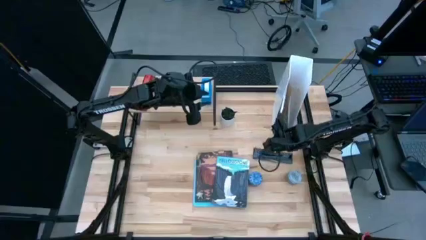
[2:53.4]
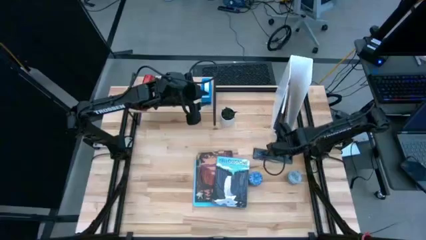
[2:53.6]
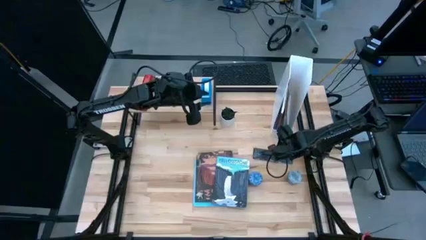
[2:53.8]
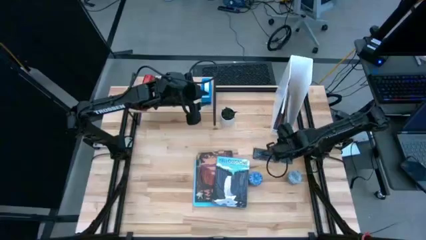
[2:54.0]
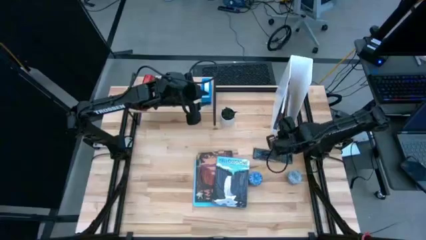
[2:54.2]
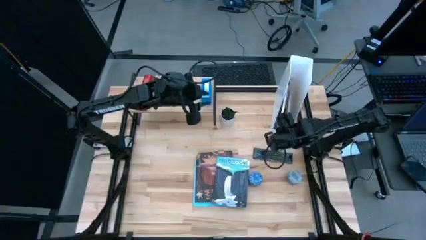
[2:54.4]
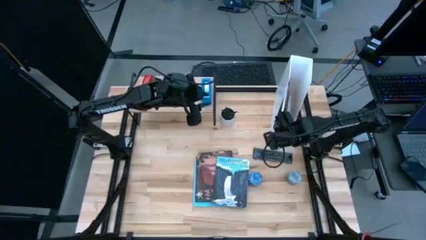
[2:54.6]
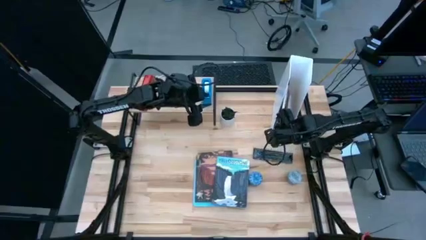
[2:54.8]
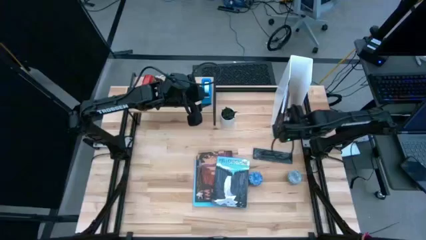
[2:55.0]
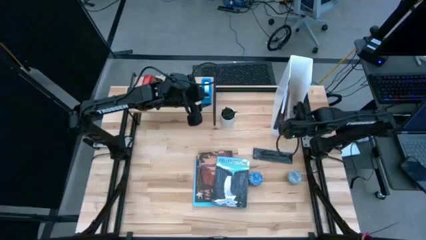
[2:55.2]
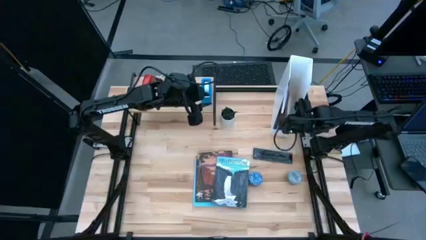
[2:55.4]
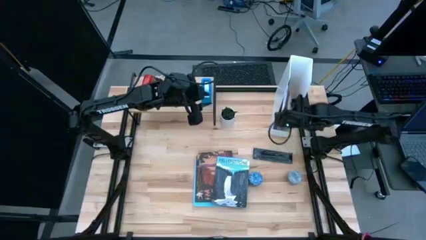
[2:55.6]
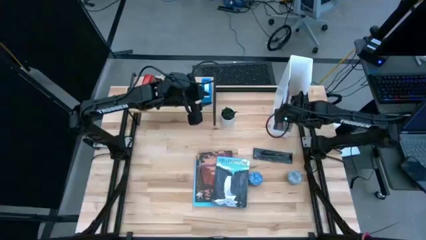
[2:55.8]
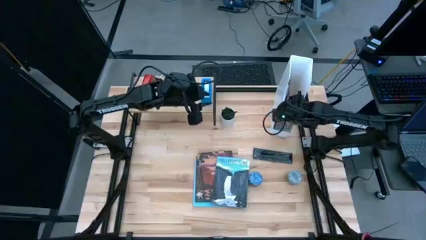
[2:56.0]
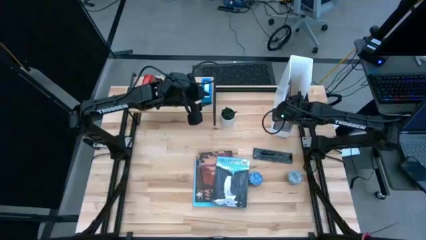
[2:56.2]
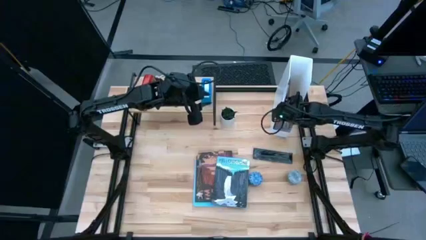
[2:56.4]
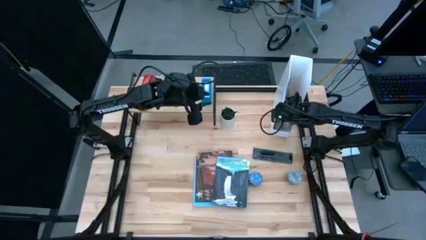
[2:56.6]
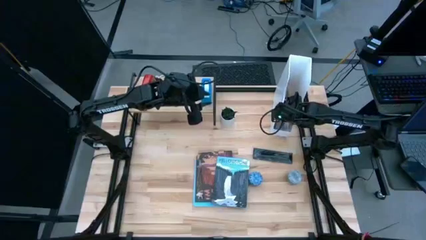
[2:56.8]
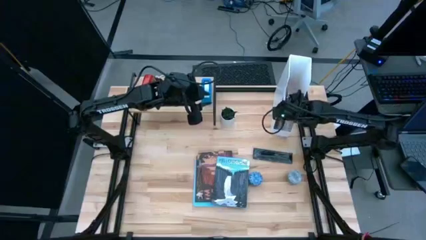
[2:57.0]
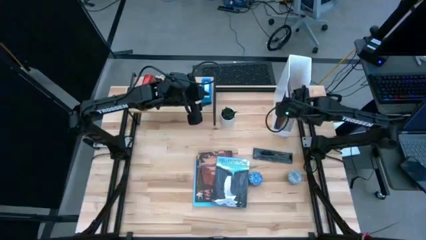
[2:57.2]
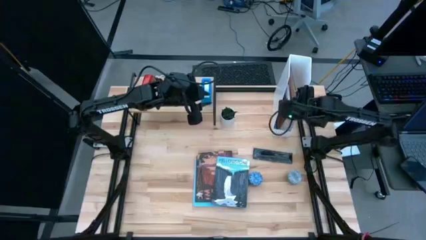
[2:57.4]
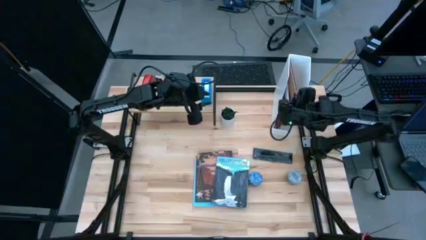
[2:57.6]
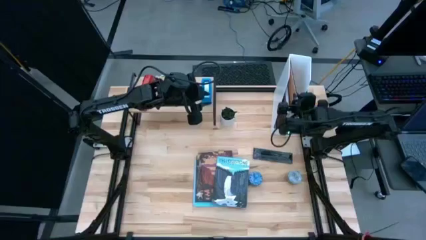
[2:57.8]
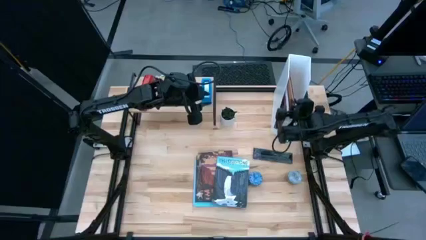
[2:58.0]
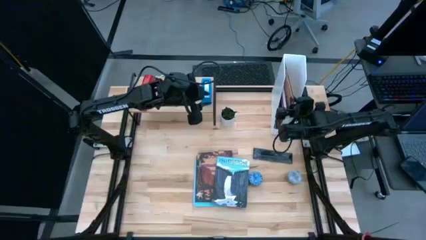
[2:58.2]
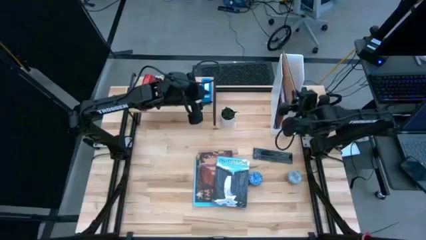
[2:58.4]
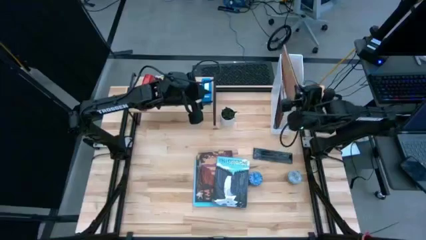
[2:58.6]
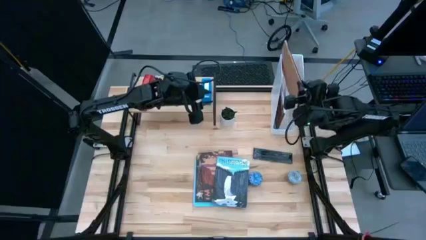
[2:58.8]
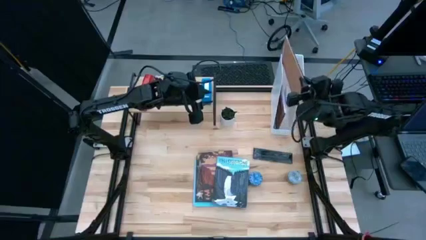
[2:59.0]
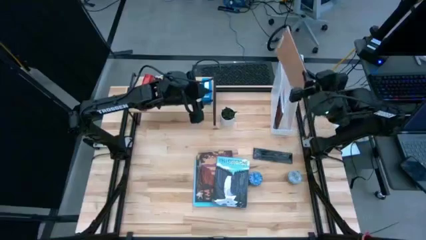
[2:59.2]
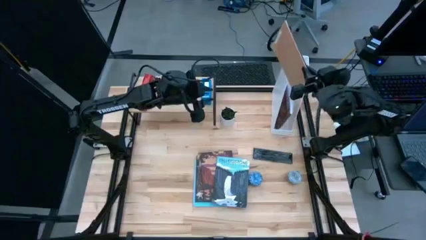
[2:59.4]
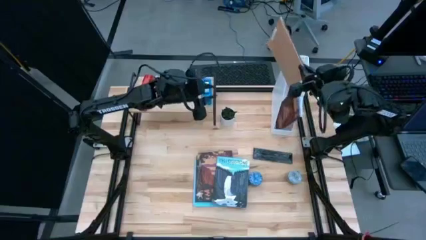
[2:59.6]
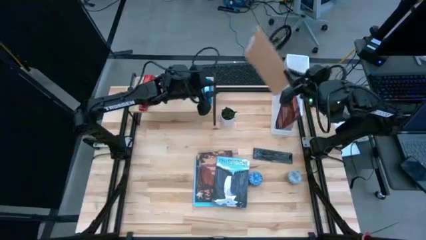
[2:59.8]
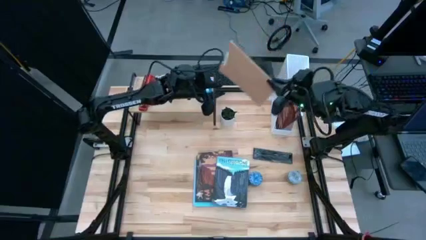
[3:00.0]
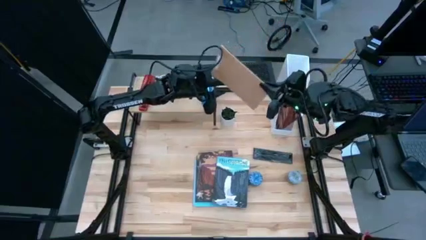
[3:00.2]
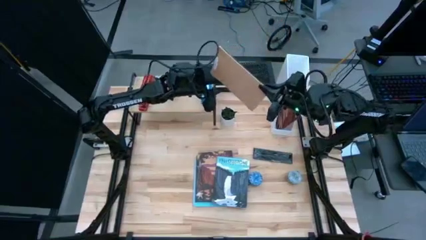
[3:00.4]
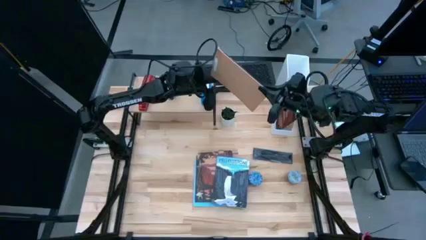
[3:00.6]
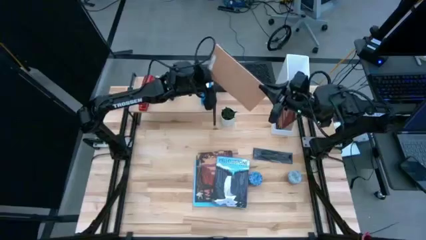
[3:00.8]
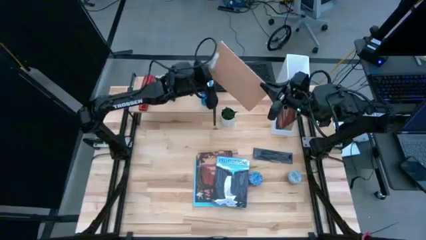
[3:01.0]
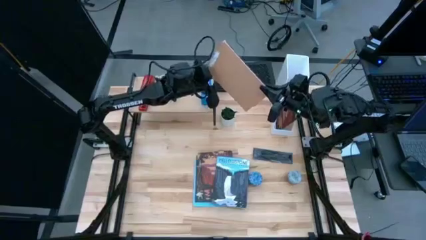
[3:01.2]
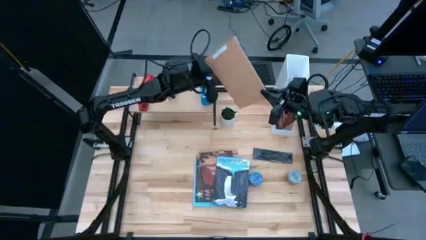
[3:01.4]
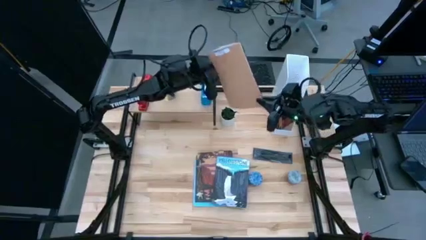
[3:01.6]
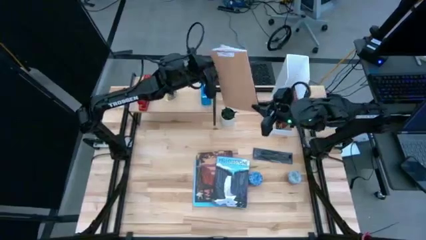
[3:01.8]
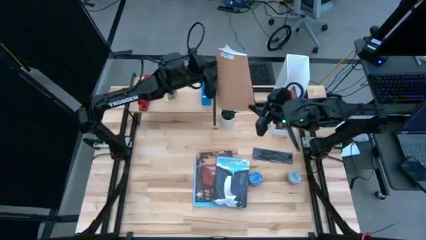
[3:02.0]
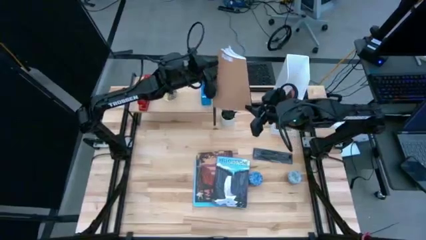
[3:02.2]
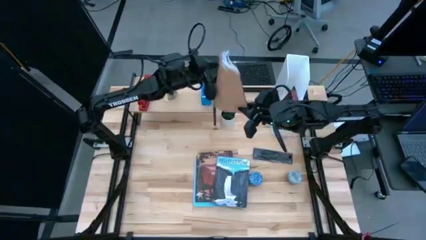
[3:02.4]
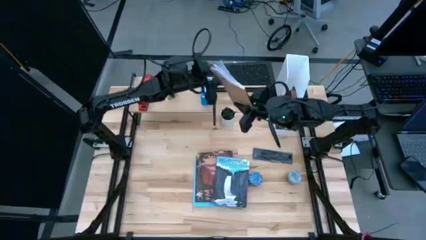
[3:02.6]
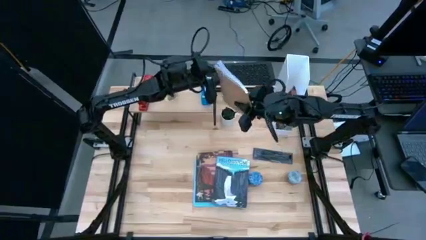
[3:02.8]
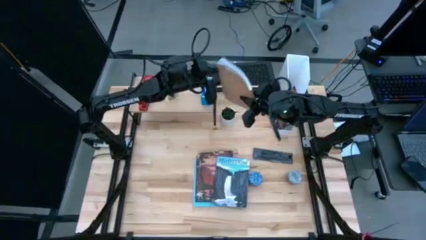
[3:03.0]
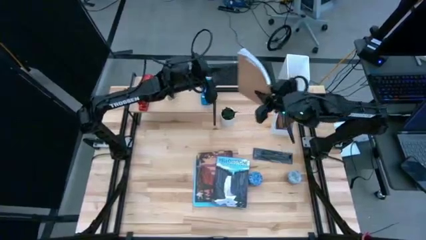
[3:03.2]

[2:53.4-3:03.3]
Task: Stock shelves
Put the blue/brown book into the white book shelf

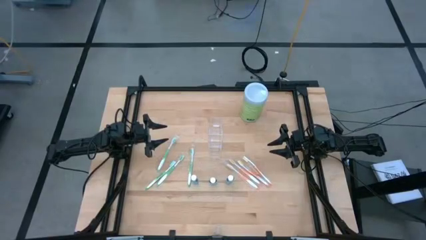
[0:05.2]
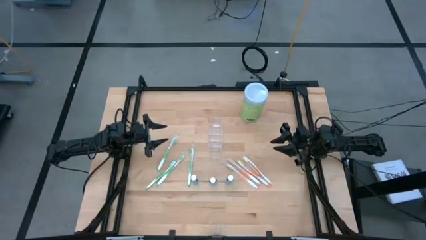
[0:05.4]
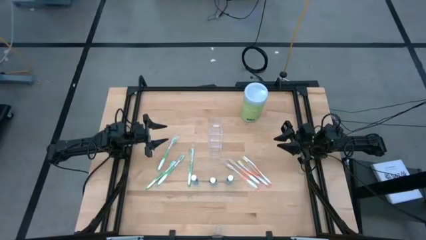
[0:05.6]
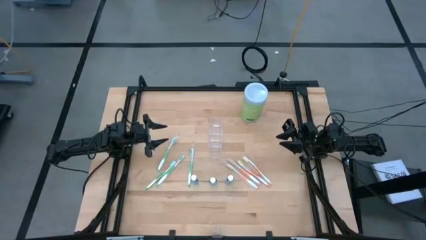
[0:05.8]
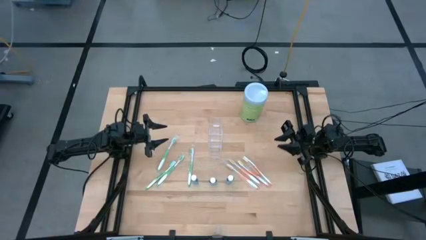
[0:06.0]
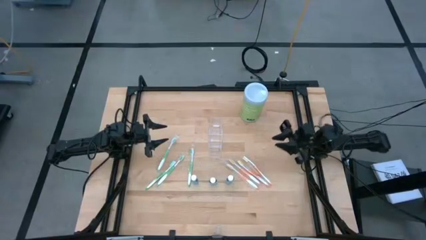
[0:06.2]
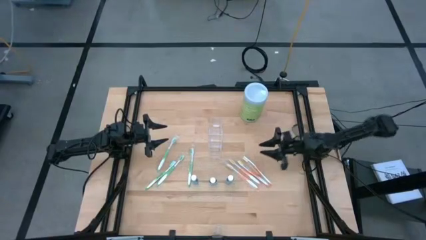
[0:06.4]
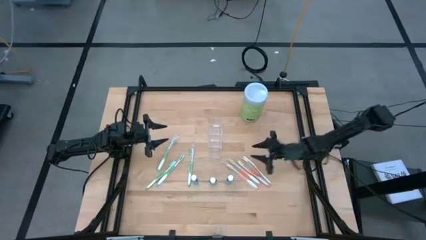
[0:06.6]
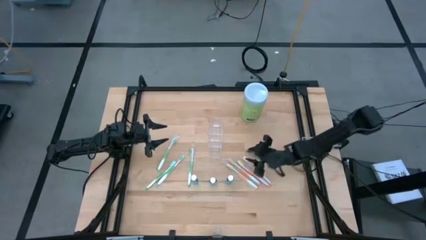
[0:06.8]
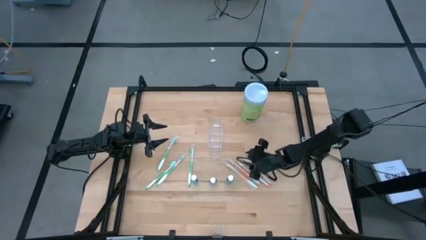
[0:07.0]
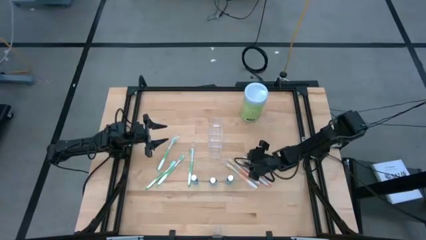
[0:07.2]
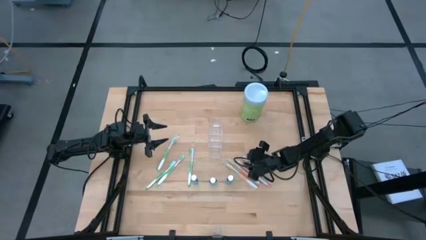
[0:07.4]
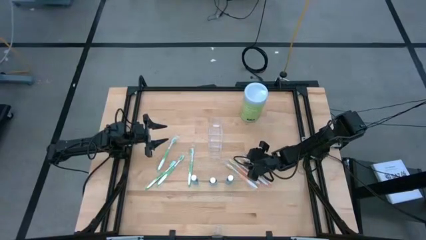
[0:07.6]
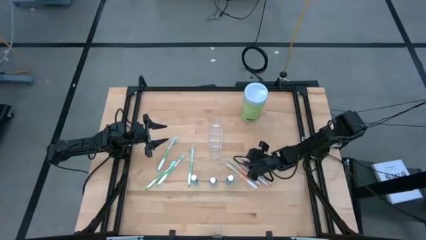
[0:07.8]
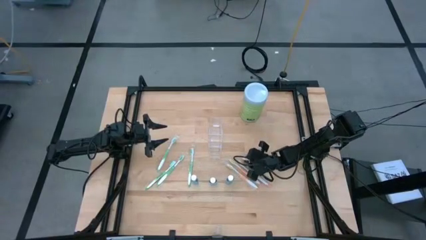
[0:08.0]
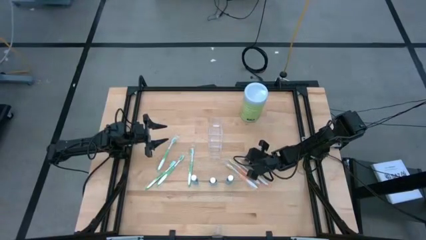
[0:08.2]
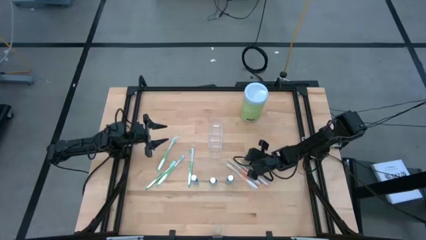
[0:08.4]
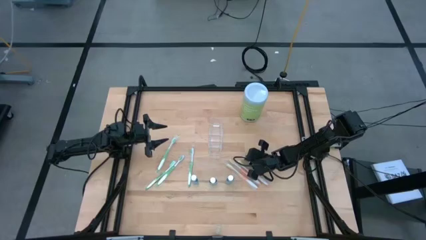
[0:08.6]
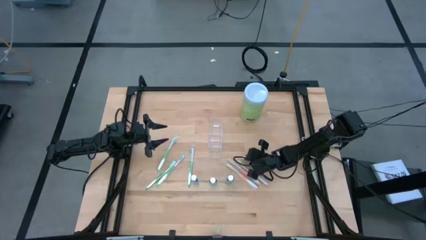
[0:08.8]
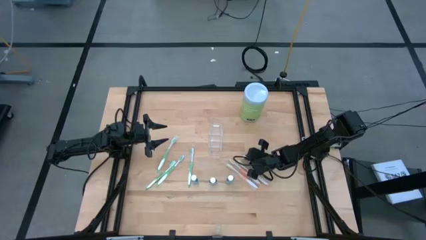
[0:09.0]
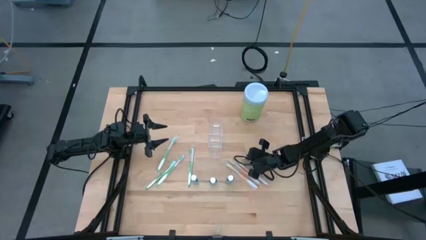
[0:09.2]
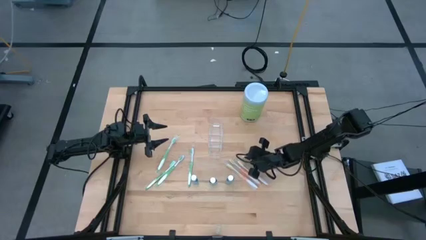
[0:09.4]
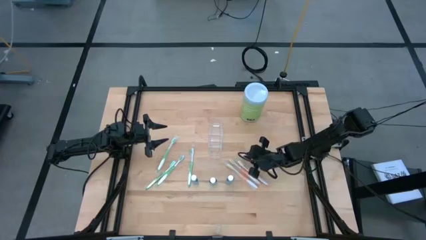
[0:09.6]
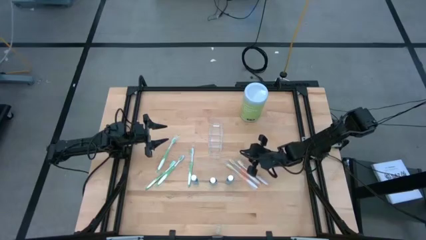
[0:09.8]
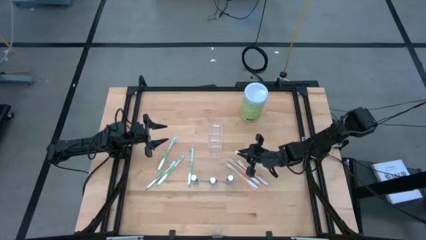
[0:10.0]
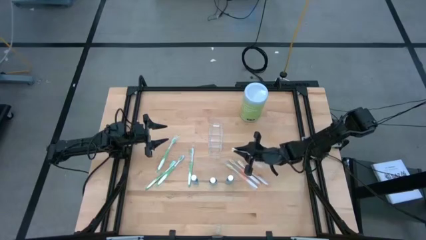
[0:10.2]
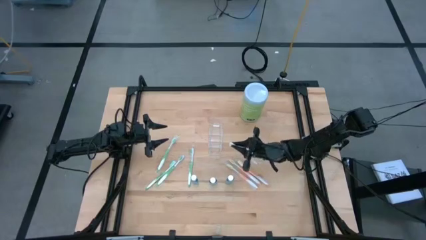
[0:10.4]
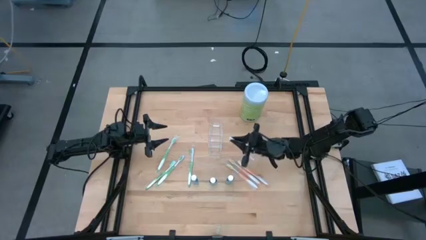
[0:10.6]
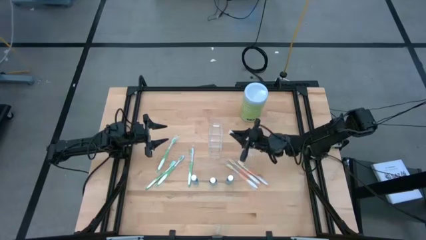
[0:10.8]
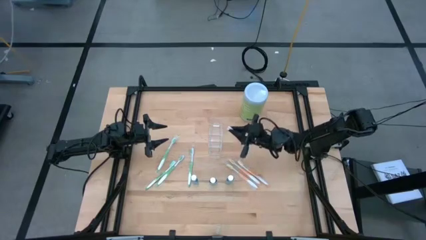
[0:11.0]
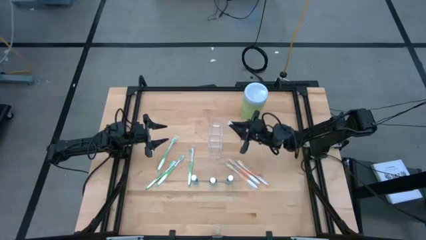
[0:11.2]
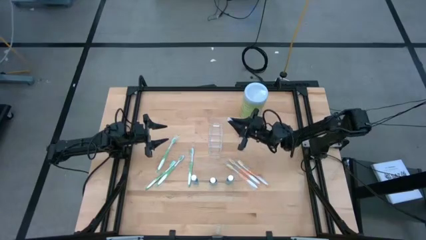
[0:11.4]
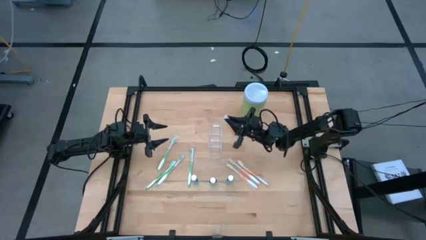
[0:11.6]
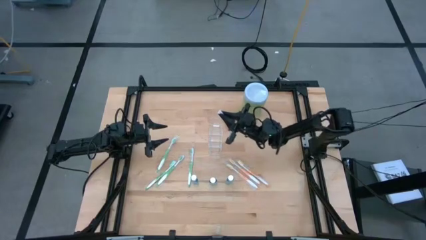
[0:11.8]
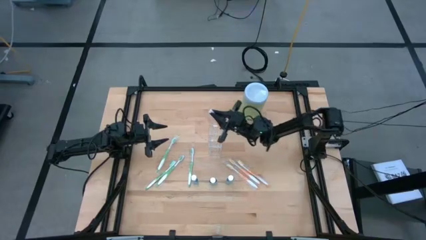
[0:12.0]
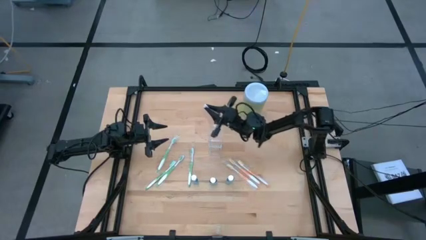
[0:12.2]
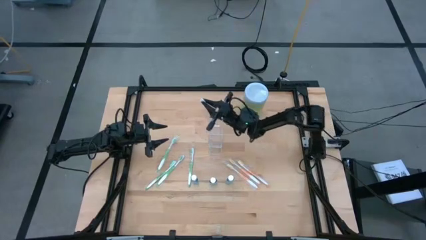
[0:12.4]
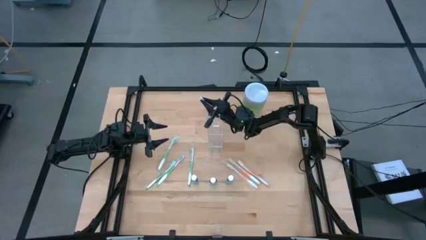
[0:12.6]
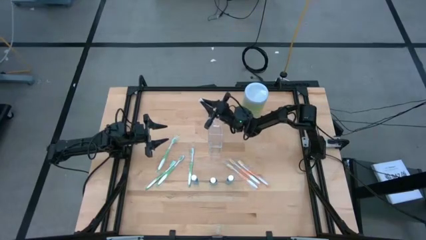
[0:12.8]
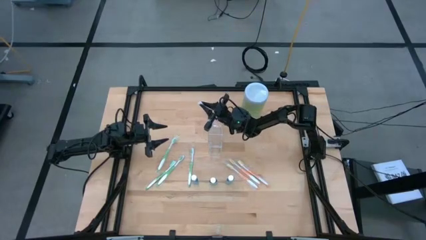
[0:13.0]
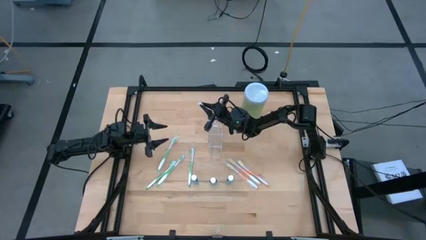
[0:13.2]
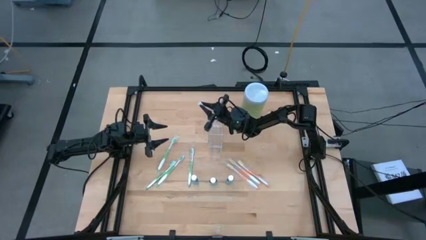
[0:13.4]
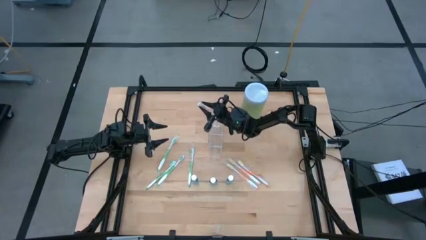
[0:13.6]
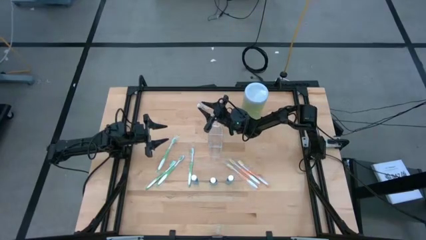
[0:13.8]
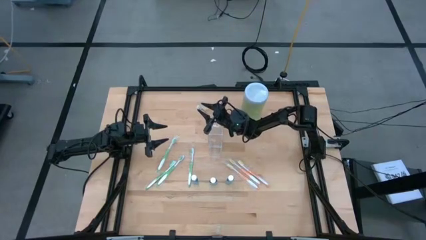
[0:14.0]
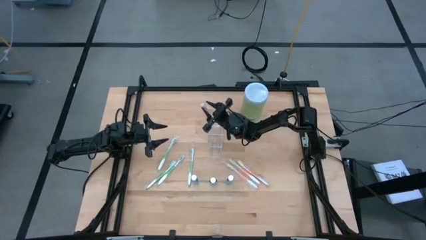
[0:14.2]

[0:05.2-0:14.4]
Task: Pick & Place toothbrushing station
Put the orange toothbrush into the top portion of the transparent organizer
